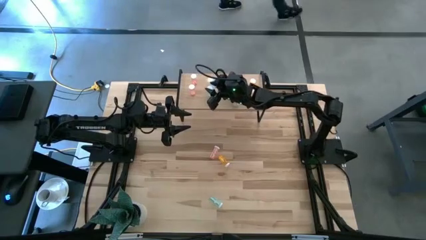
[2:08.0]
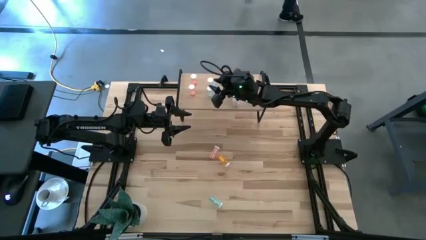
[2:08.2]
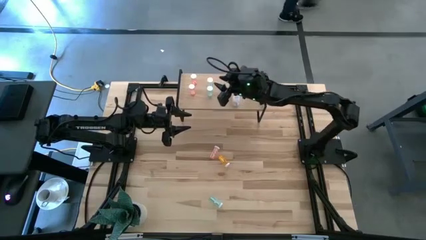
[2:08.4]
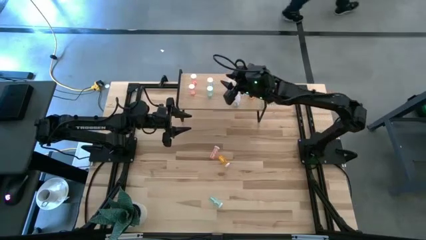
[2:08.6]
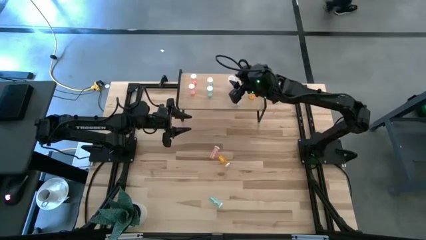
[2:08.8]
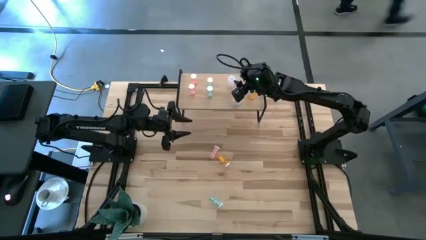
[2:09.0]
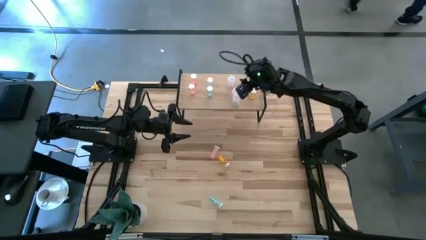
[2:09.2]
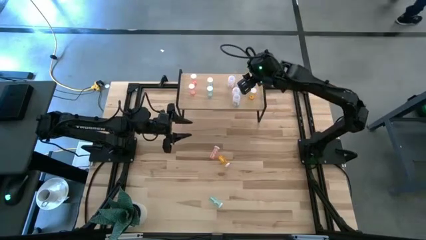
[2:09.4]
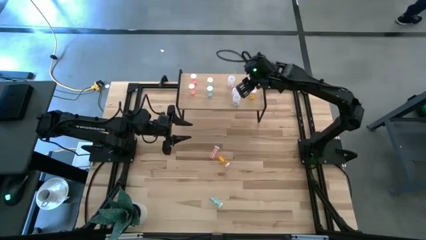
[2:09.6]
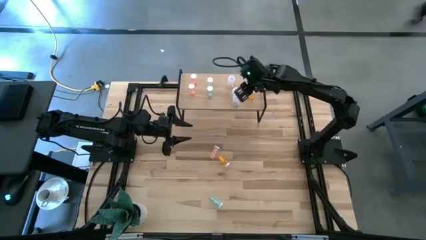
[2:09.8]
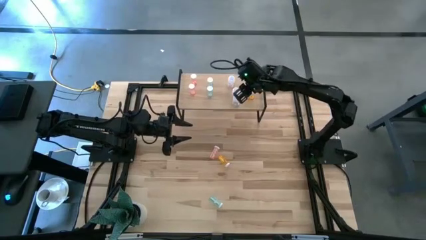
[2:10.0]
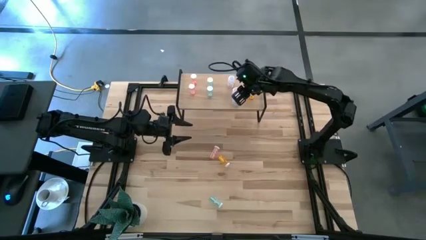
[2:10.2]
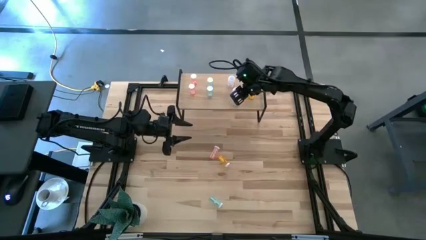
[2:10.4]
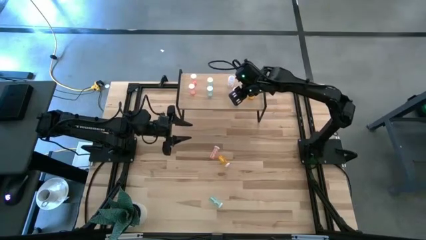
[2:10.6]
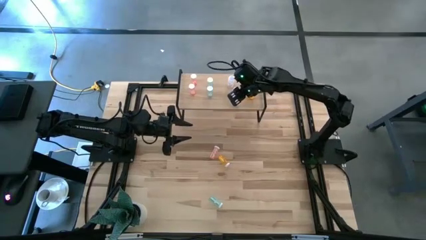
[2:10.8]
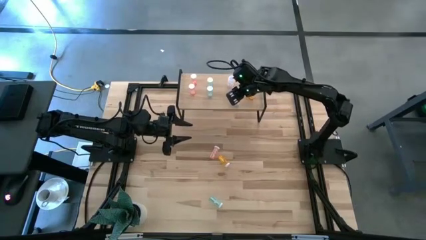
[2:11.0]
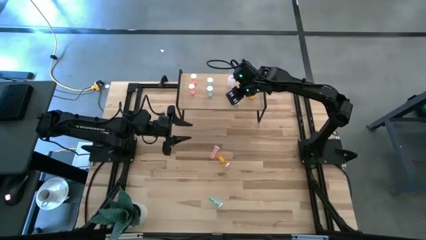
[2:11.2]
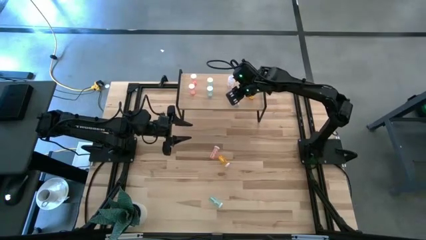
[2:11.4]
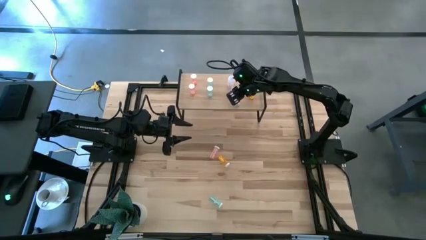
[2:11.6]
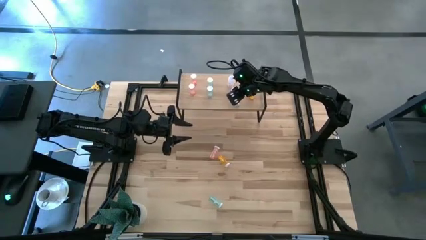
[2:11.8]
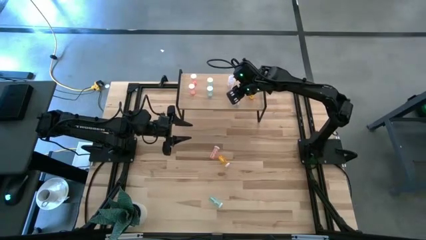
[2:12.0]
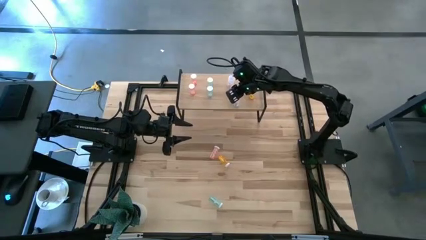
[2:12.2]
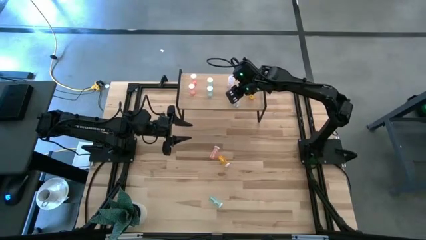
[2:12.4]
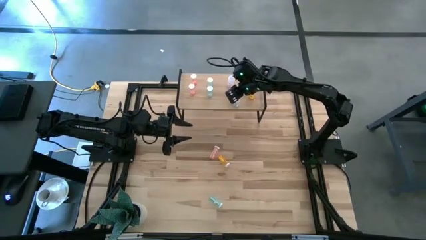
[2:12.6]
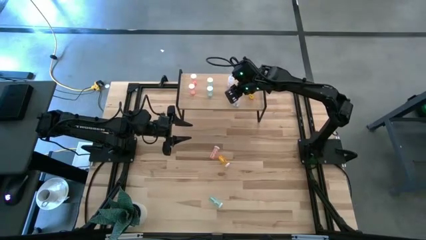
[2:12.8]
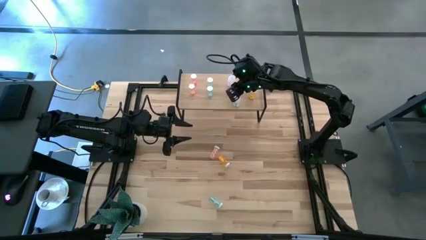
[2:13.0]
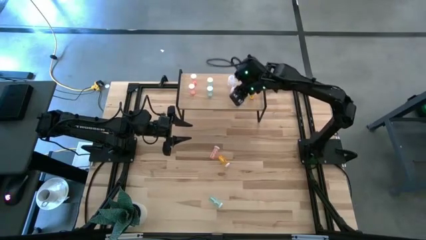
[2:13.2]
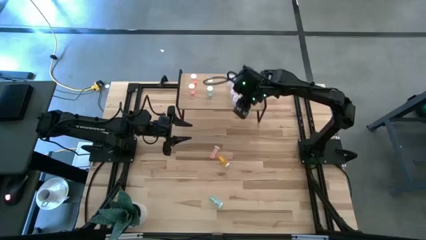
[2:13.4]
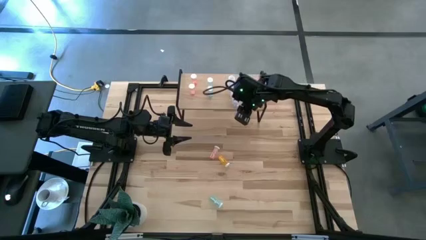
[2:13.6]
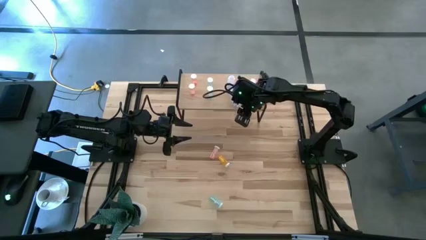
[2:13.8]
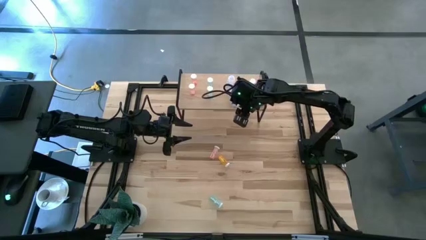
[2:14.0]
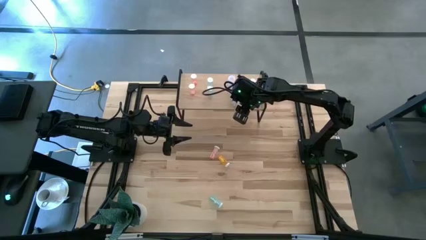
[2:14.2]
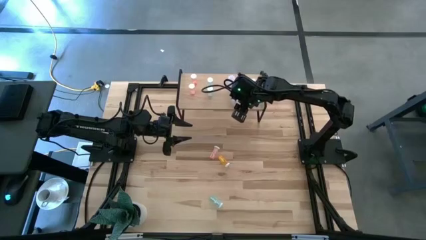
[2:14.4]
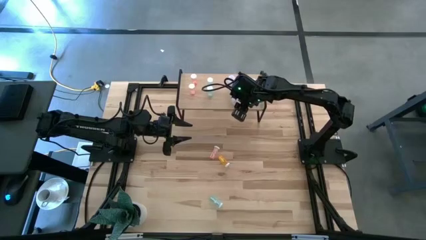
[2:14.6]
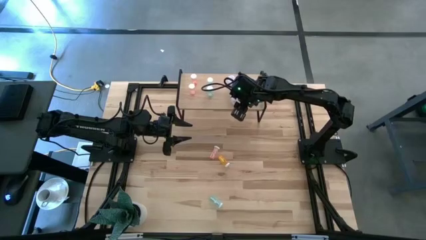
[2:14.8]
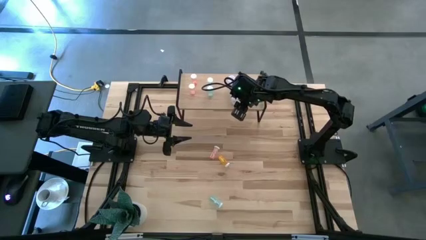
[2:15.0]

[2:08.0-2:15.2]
Task: Pick and place medicine bottles onto shelf by color
Adjust the transparent pill bottles on the shelf
